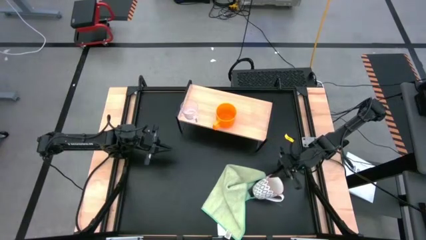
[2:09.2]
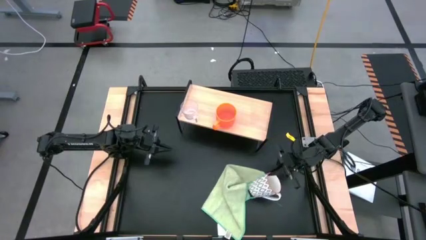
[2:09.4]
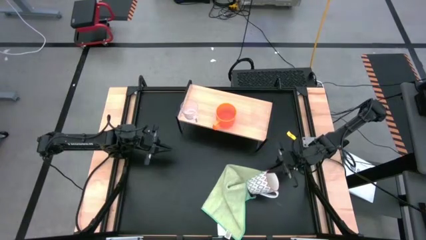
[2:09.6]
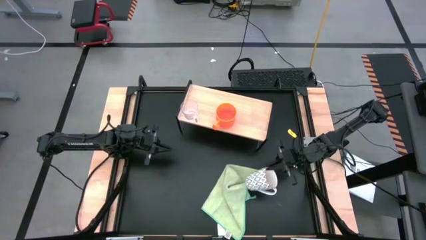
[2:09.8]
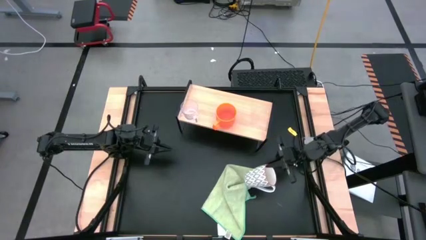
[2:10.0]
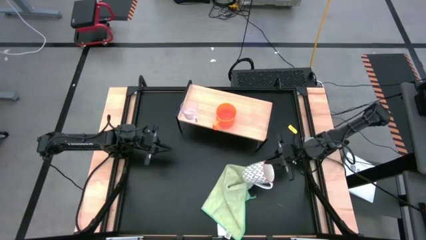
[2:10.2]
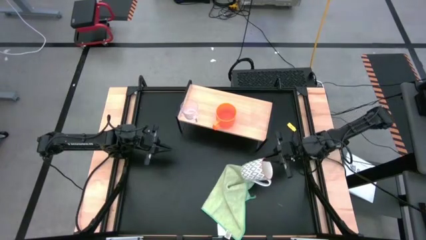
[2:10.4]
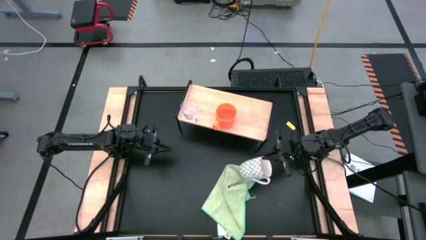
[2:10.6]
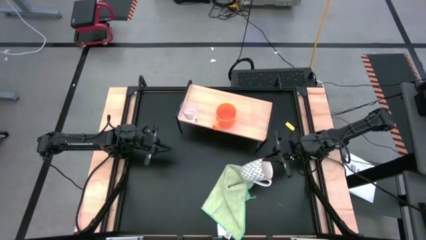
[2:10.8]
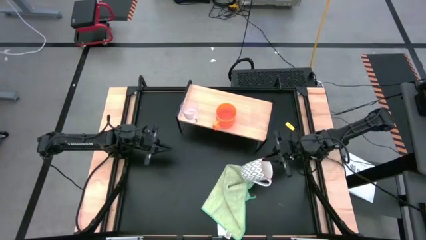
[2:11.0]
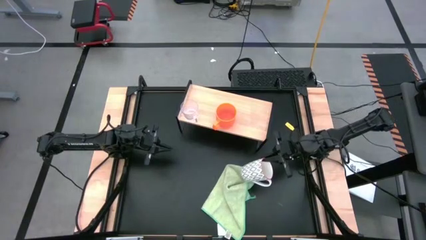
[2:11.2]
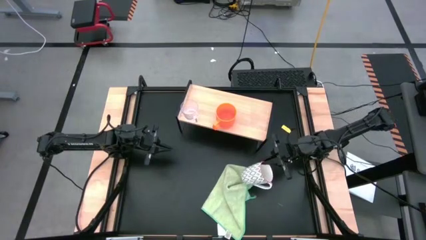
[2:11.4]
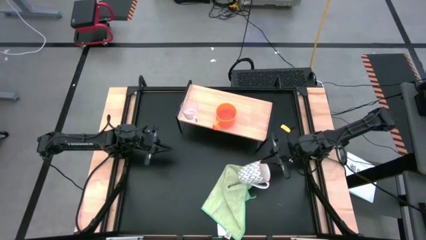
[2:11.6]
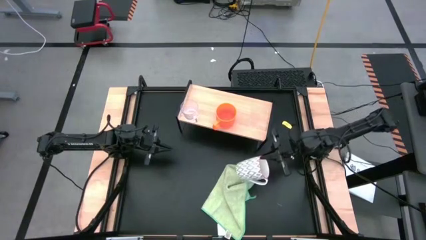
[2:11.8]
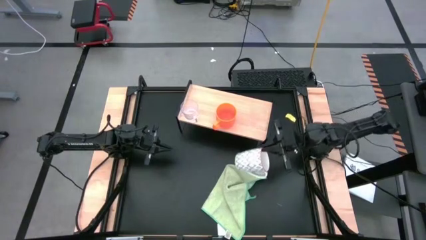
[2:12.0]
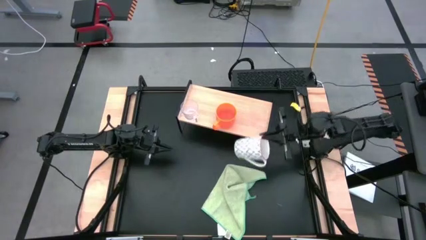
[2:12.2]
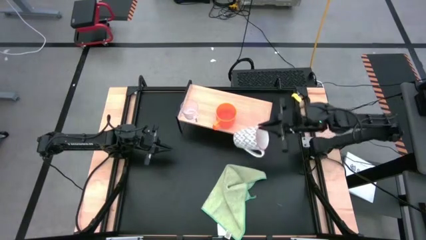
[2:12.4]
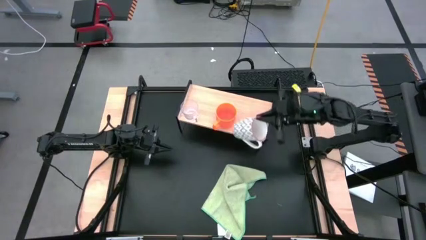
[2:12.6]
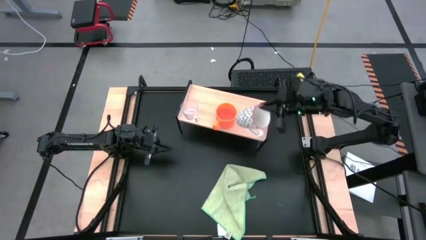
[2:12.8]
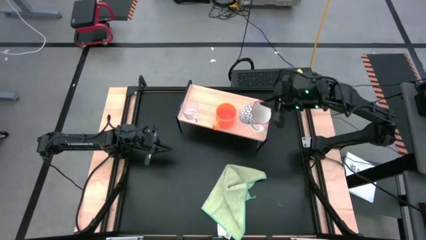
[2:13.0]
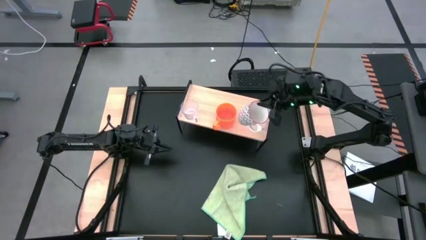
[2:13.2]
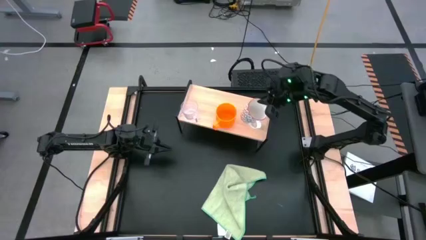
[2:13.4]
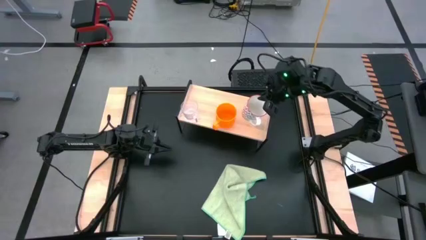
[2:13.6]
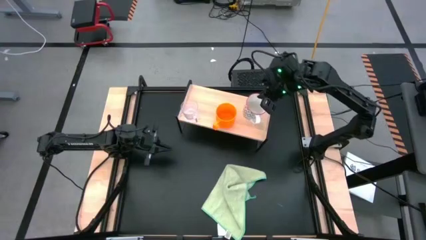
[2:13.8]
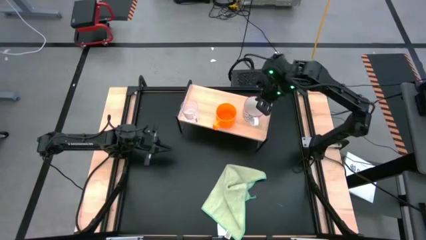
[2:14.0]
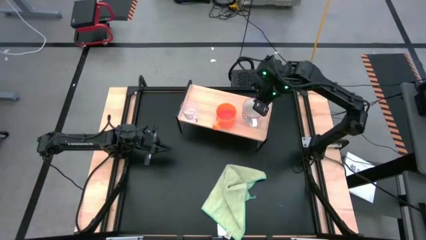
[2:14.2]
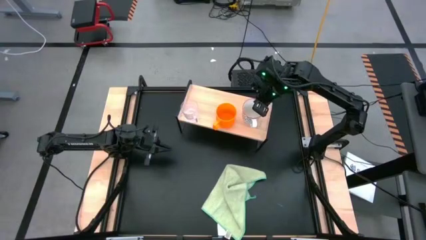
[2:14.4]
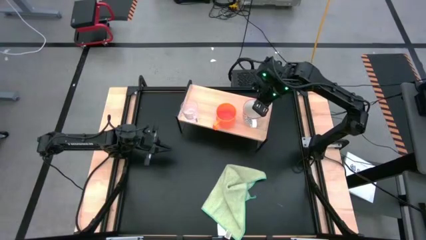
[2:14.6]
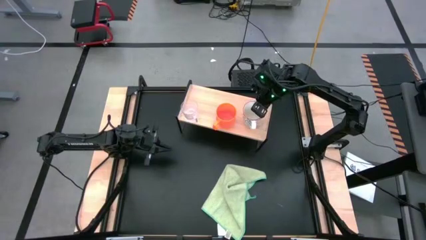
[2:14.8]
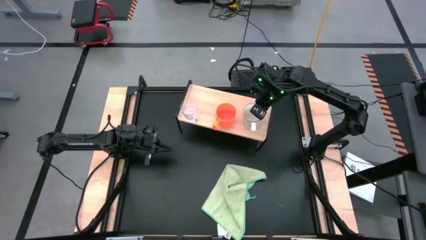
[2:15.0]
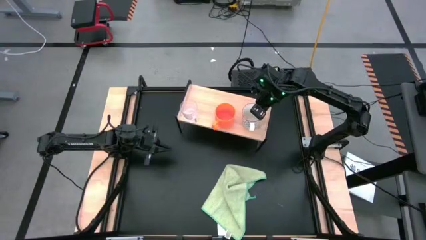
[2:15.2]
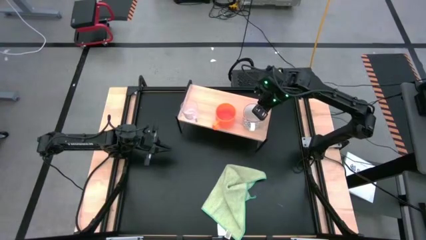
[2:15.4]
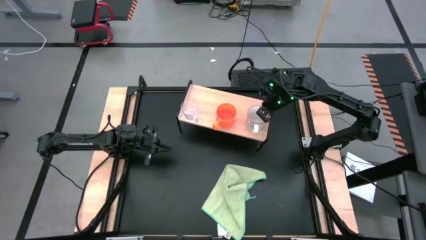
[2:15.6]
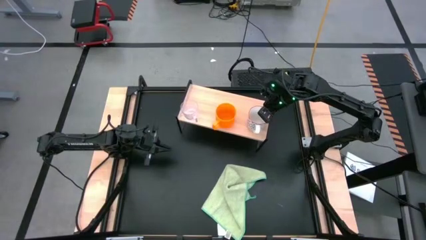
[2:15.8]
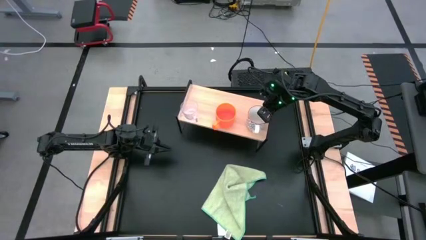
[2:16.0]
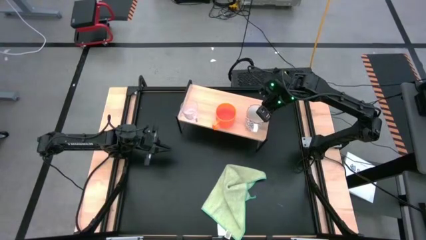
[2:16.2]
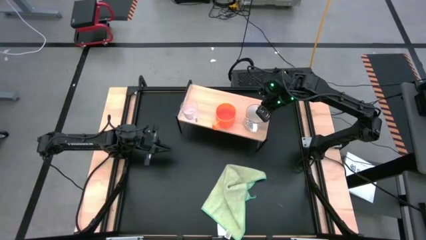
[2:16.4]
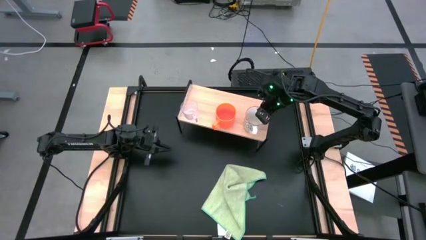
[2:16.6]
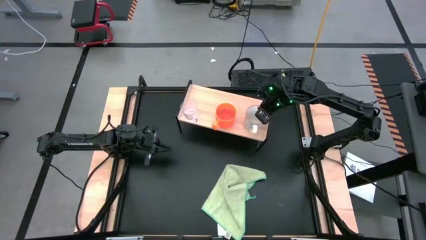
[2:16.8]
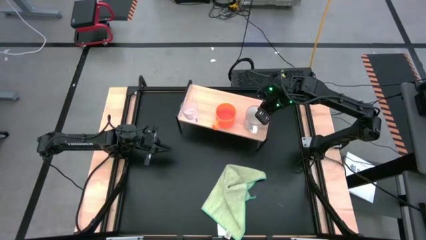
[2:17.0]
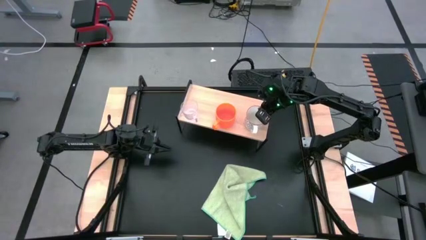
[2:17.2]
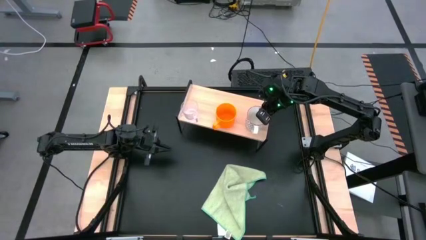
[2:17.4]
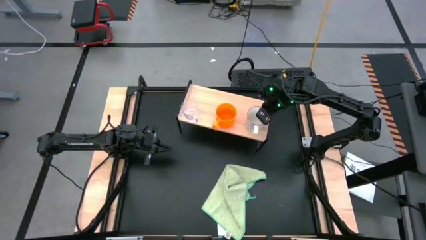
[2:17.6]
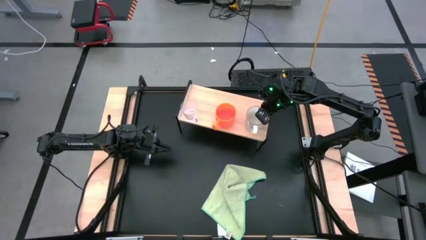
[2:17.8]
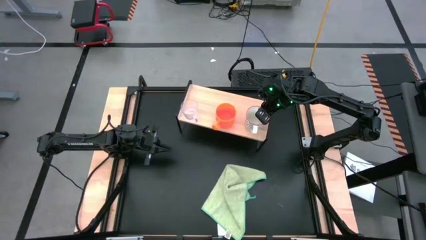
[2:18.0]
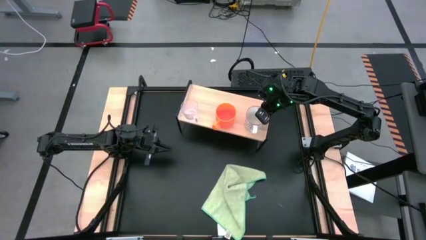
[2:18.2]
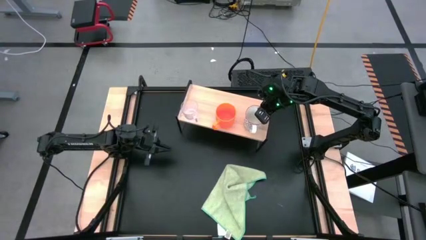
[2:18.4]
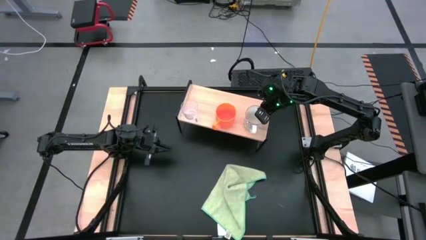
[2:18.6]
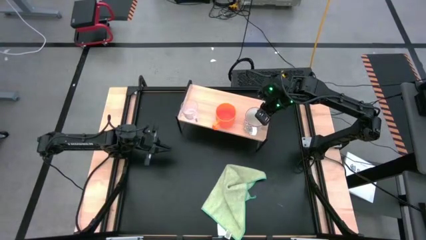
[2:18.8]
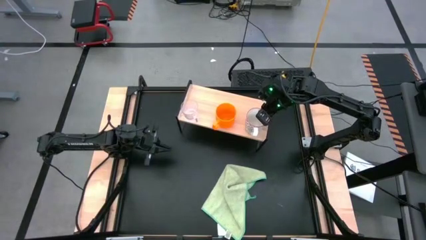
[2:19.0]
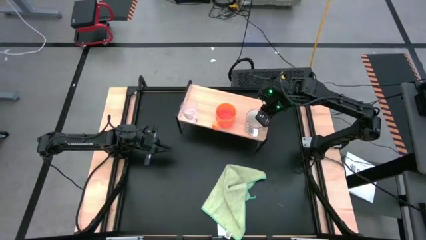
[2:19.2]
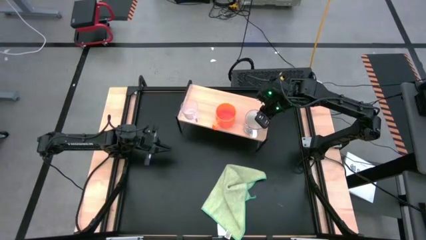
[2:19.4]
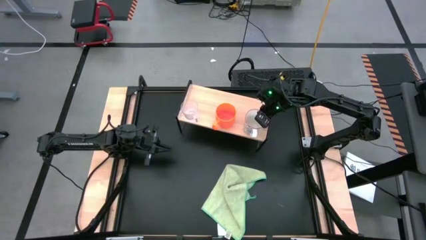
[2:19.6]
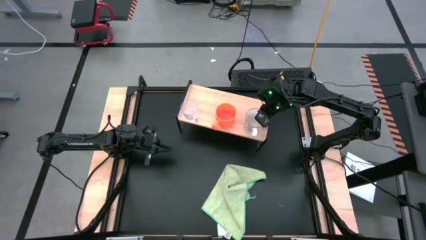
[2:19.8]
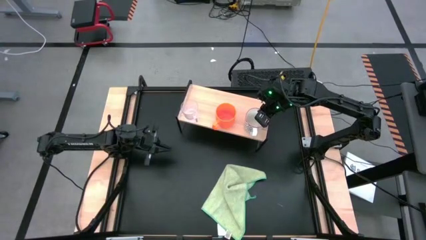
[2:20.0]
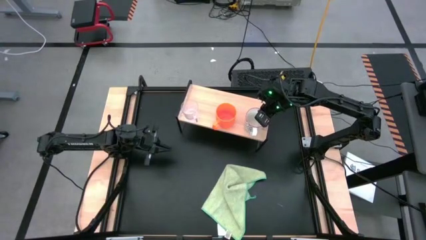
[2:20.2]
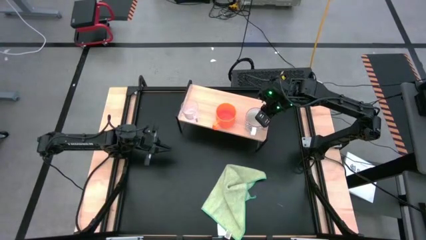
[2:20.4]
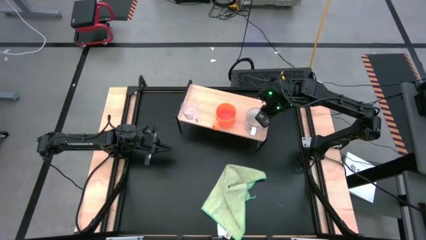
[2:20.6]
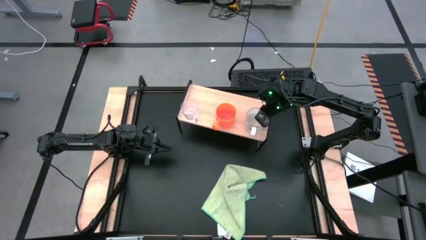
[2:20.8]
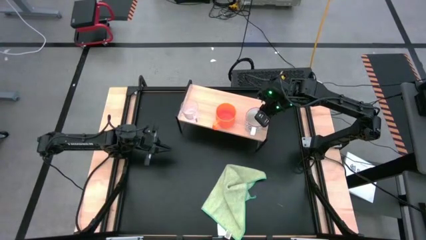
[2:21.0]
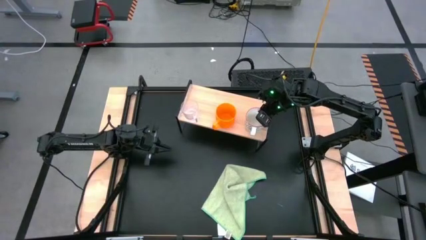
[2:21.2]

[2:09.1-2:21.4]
Task: Stack small to large cups/mugs on shelf
Put the patterned mug on the shelf

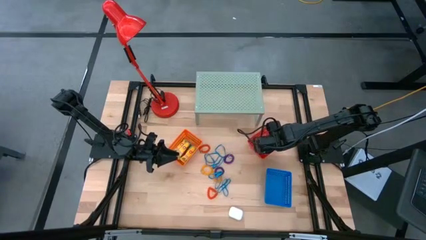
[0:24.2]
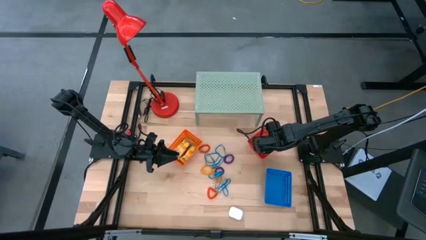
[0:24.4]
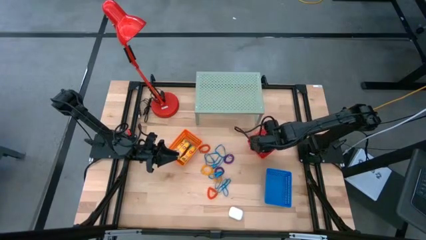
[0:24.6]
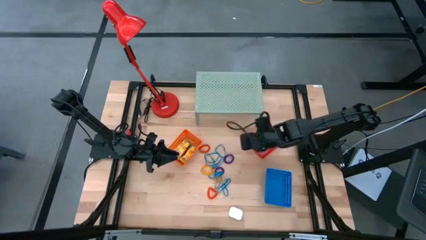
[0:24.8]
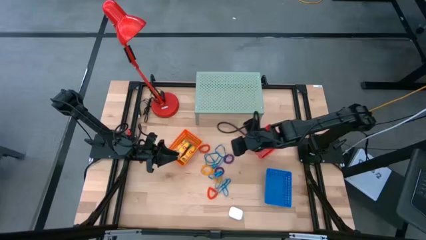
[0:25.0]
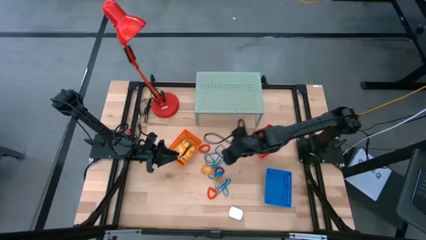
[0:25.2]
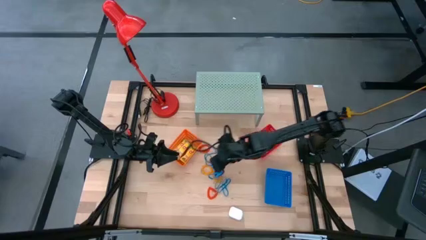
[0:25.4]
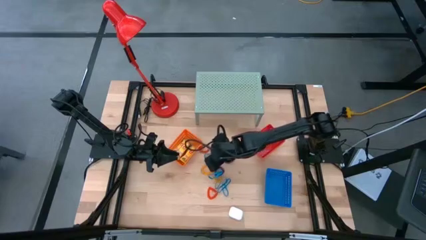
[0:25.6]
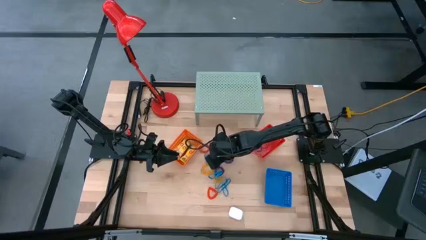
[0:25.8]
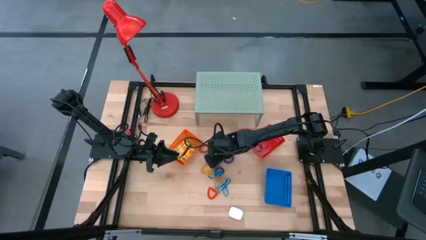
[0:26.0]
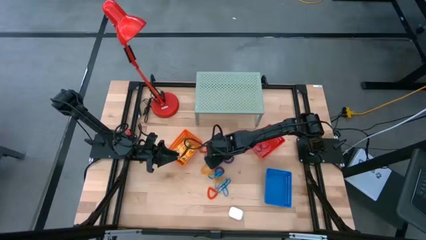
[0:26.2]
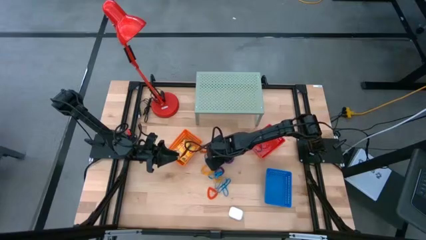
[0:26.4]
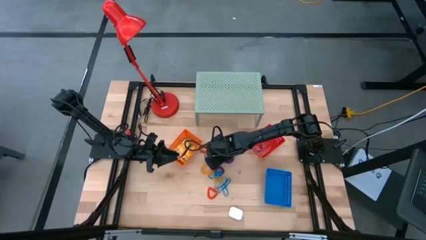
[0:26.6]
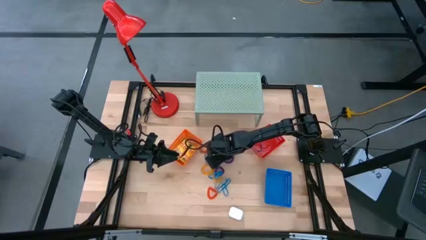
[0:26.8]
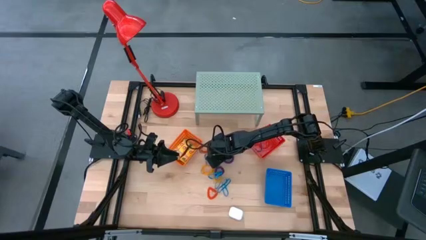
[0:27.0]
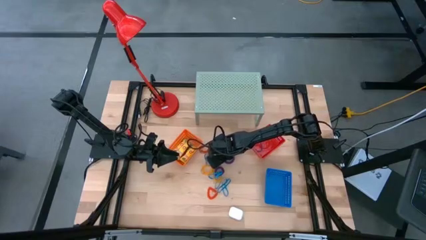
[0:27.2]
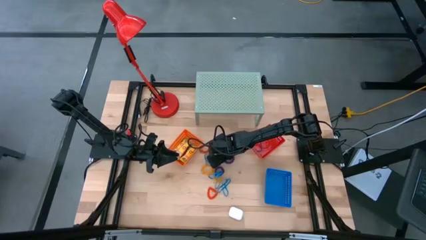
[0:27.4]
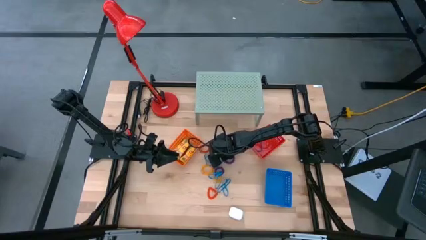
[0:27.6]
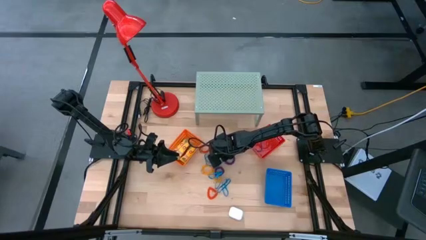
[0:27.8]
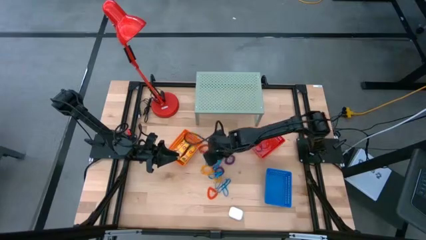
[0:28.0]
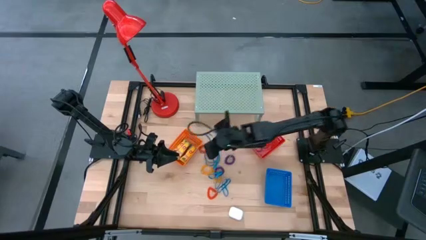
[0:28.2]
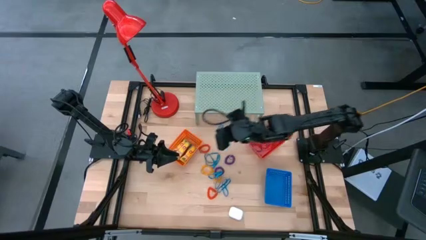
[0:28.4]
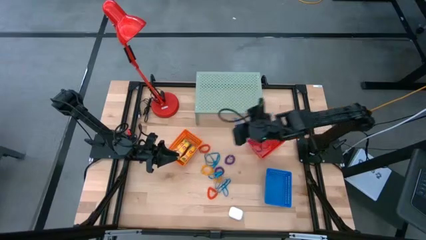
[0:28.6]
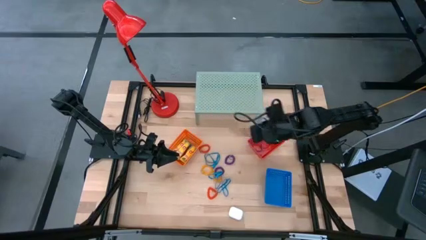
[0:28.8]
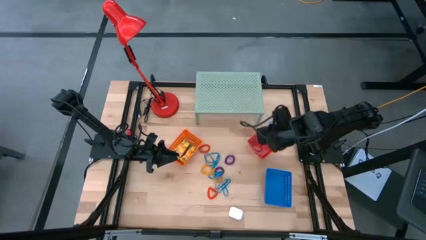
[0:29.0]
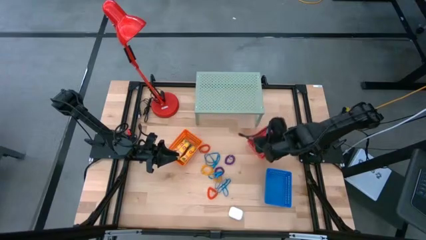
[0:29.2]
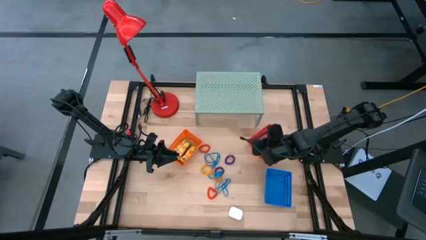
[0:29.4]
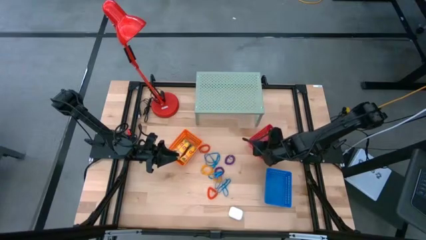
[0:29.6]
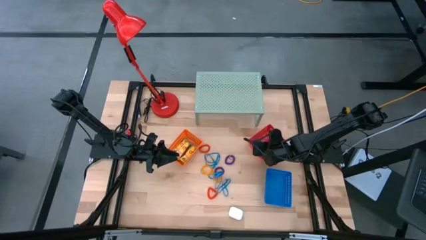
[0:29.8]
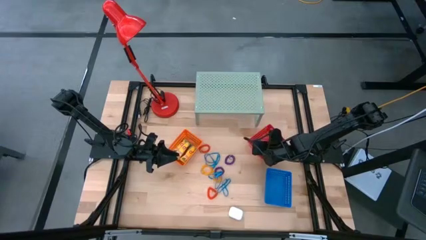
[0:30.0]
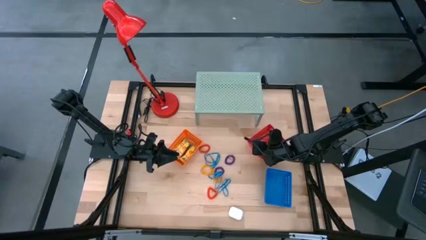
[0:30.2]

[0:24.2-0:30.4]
Task: Pick & Place Office Desk Supplies
Put the blue rubber band into the red bin
